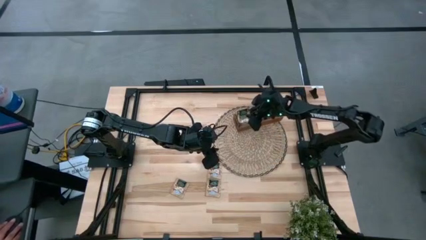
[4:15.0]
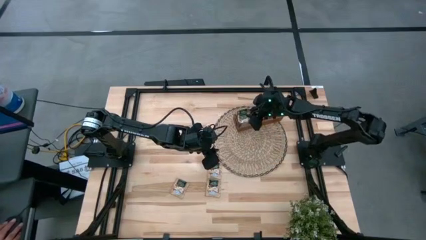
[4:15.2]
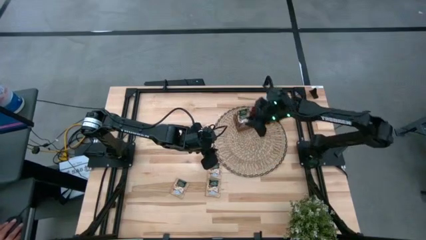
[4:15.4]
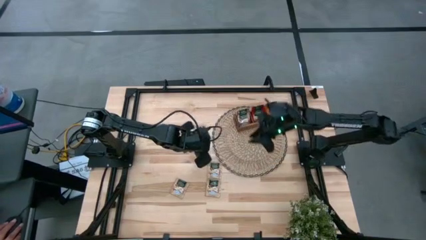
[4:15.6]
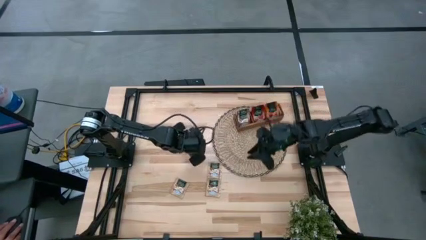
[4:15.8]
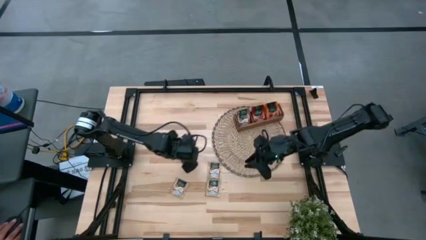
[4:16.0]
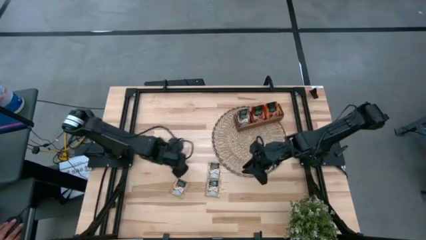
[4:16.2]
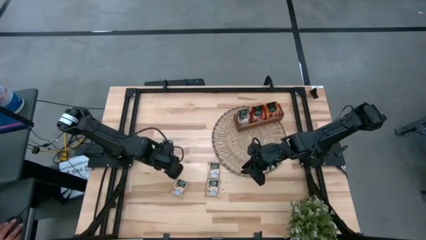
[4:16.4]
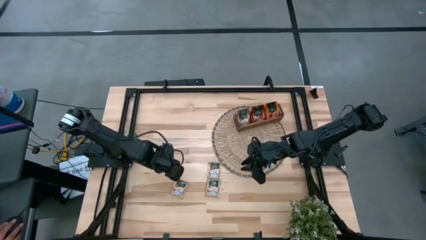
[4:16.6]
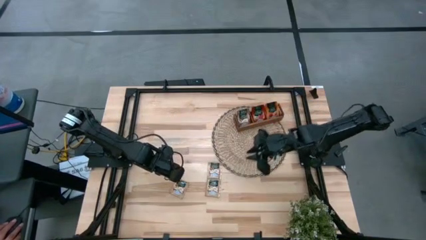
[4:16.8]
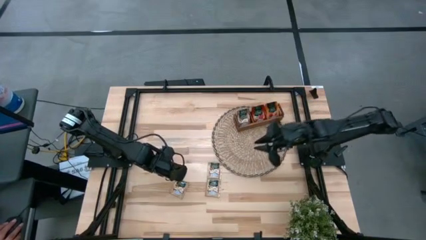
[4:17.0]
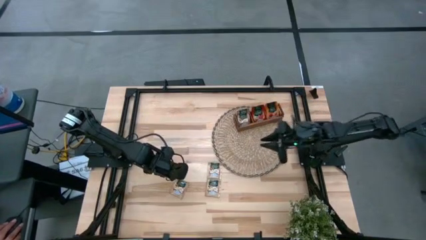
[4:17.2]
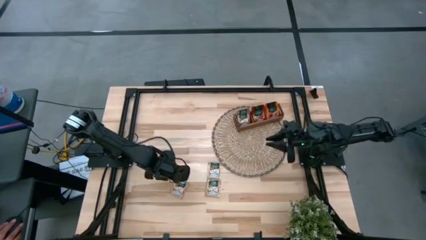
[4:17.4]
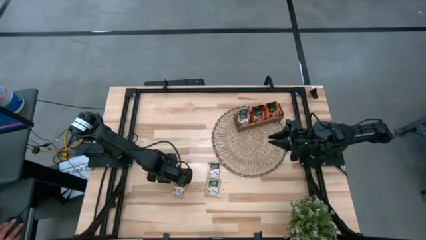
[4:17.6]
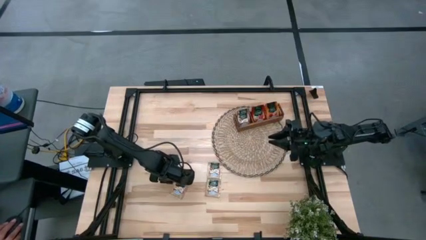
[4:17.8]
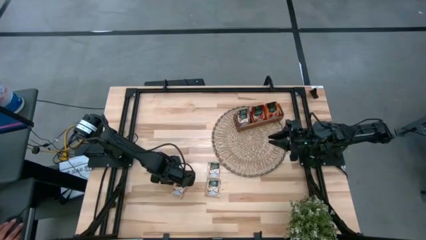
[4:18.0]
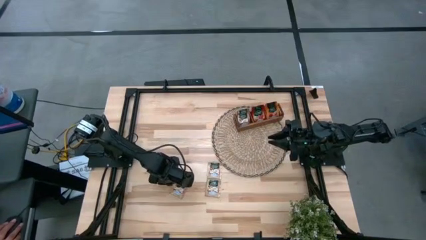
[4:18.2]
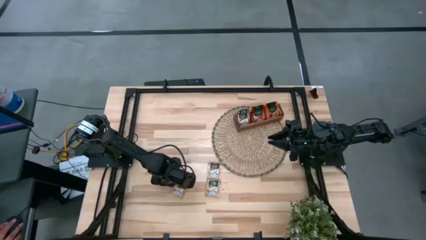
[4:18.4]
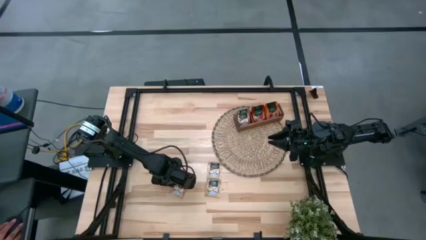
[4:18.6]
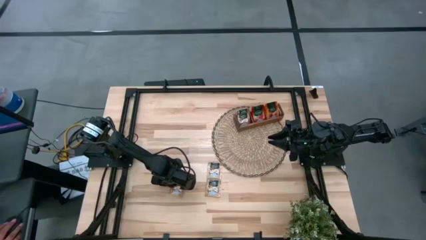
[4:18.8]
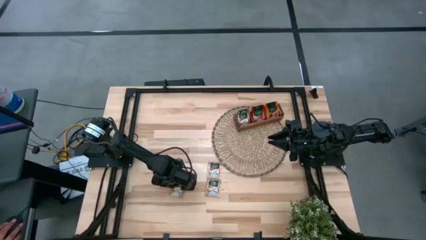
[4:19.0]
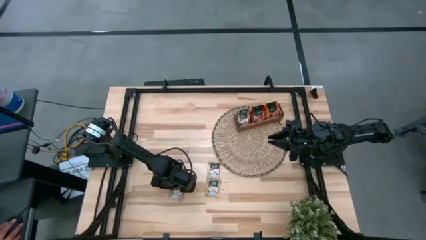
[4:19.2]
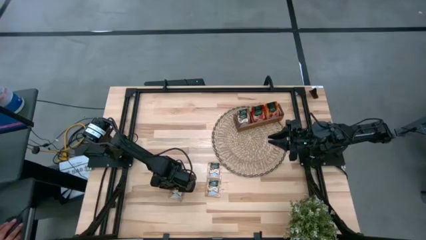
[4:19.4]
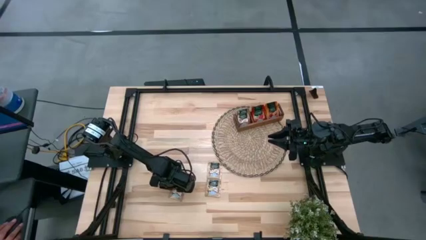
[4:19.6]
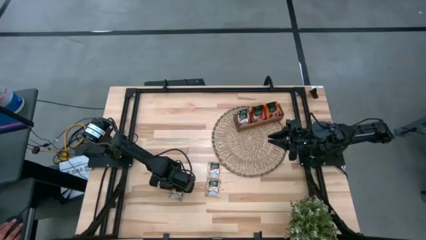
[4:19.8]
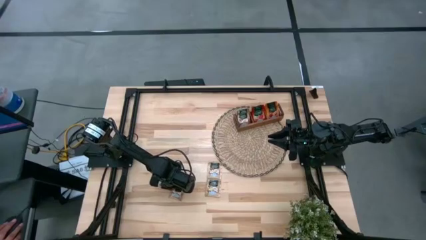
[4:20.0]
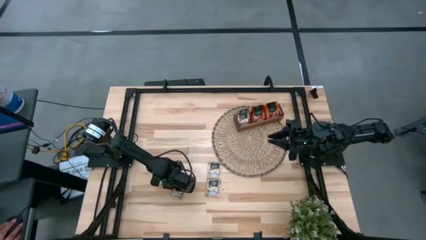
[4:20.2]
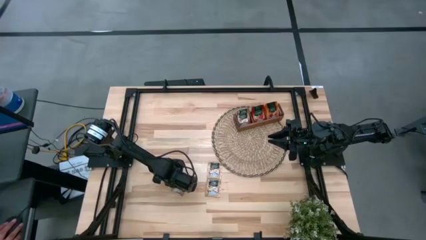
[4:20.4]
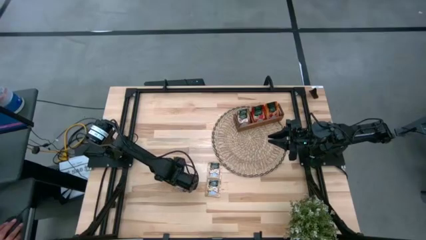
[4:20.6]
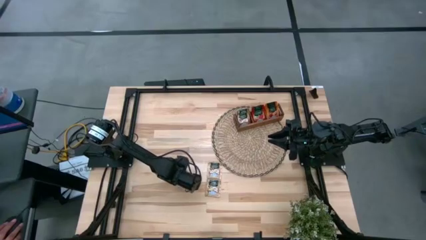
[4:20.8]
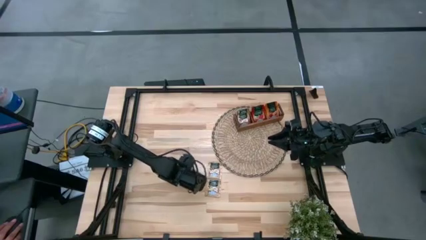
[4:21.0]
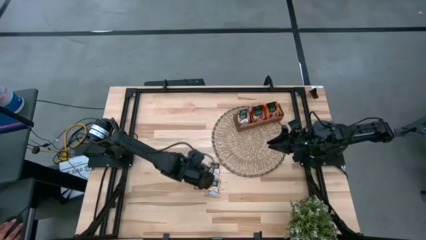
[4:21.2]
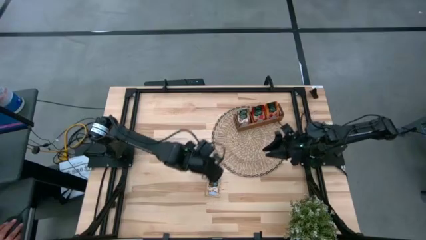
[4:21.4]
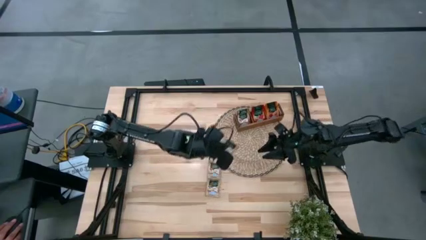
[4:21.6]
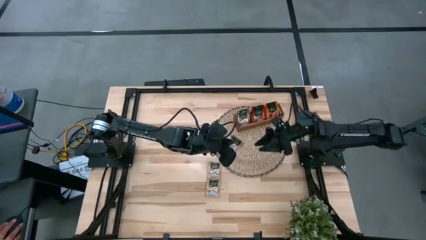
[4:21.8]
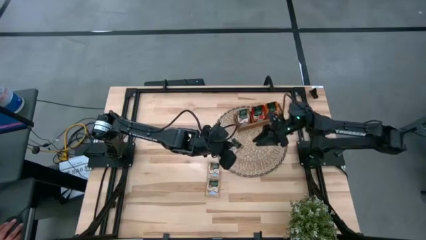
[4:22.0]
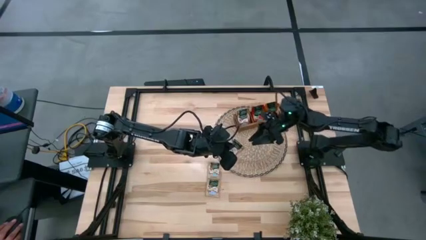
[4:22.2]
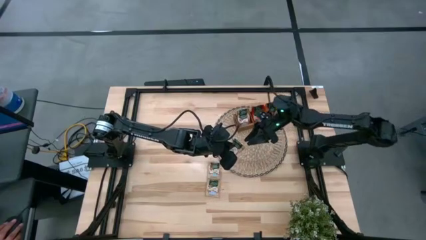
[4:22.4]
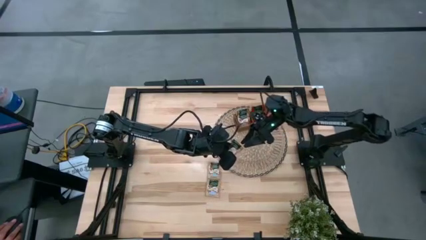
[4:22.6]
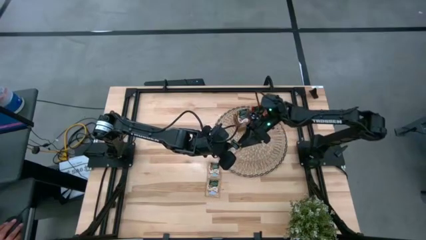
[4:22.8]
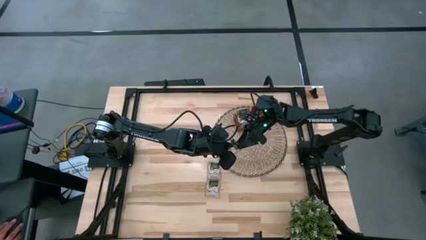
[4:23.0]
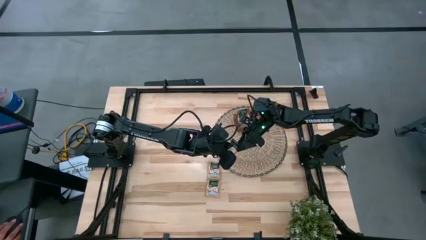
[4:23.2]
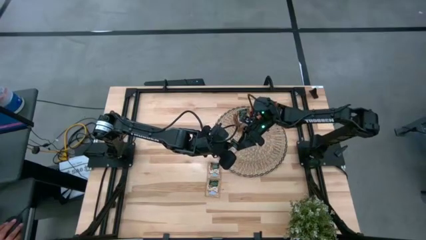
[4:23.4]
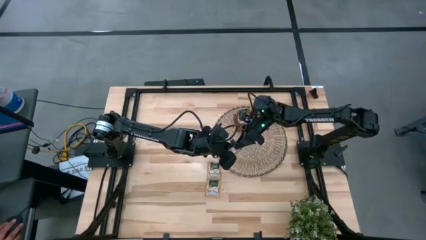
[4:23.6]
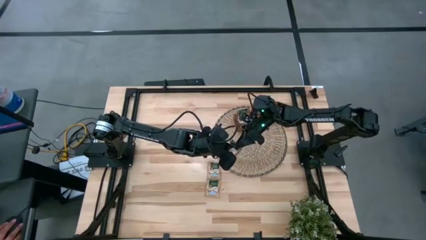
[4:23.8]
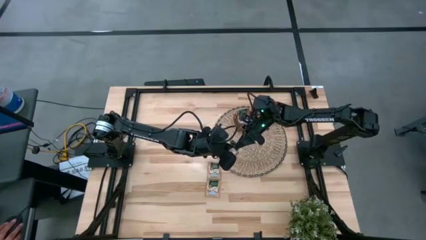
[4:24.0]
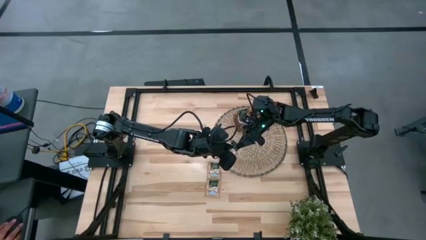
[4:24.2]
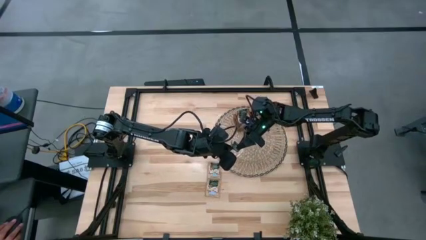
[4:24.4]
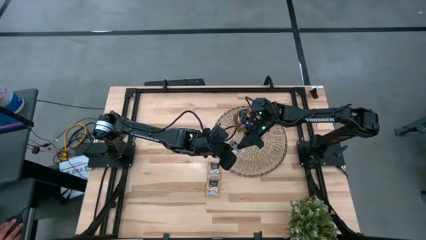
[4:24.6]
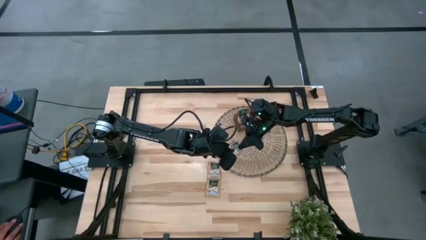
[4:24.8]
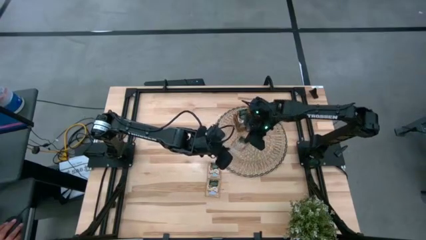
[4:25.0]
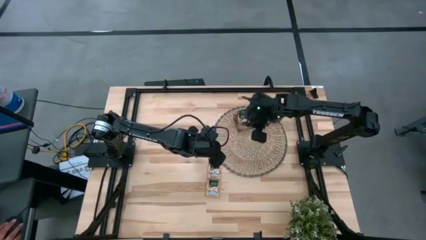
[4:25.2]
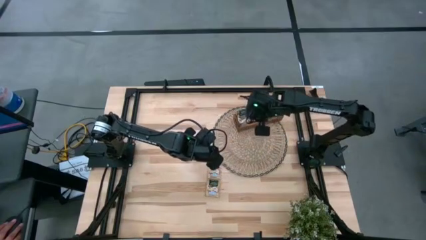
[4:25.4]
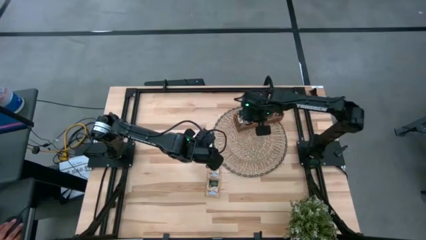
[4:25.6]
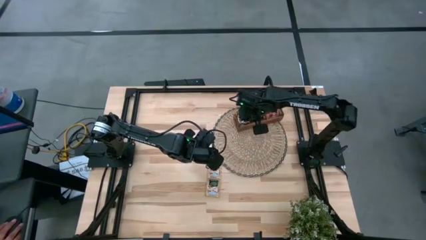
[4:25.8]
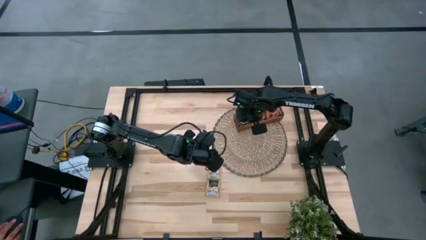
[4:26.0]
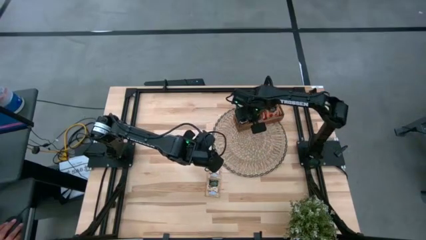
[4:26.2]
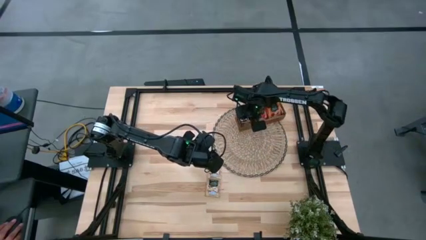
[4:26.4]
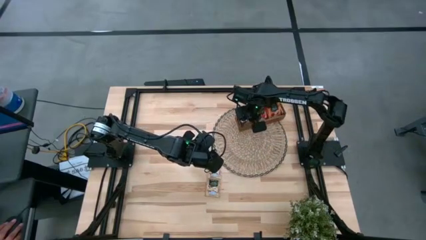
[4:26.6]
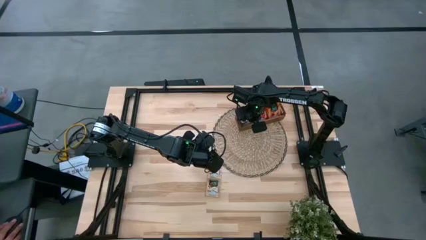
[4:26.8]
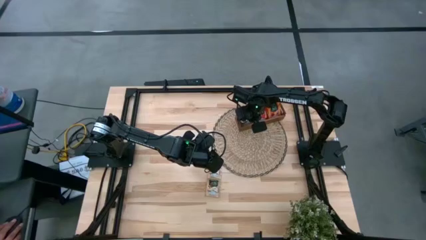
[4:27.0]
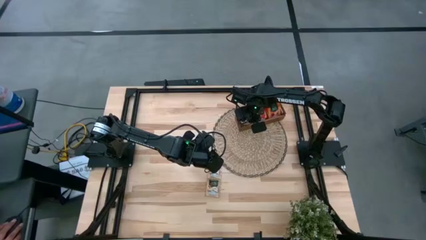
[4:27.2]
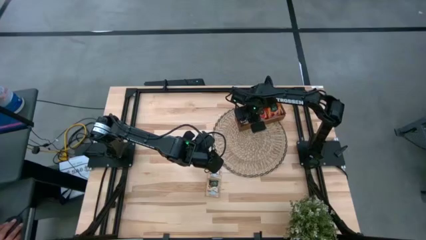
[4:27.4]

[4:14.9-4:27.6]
Task: Pick & Place Tea
Put the brown tea pack into the left compartment of the brown organizer
